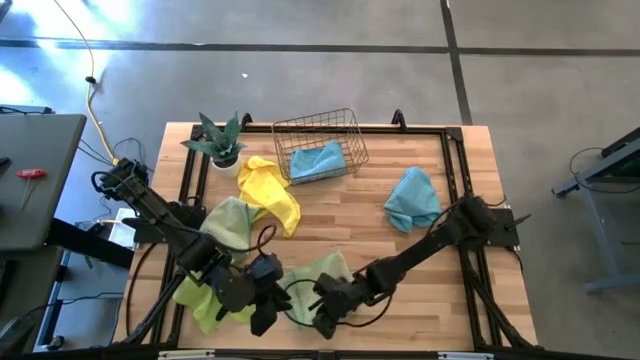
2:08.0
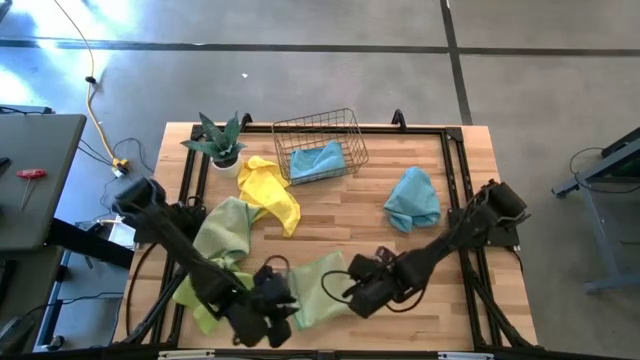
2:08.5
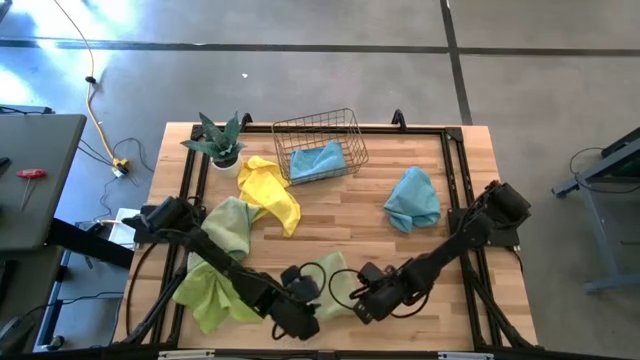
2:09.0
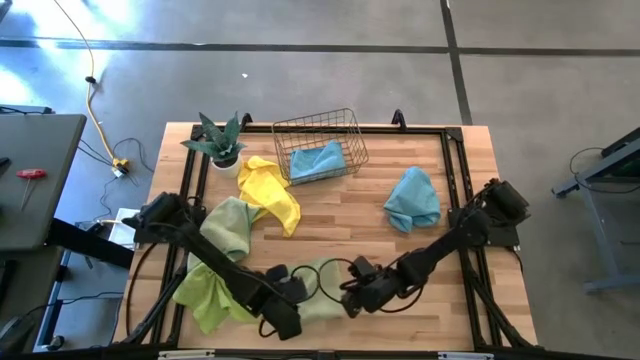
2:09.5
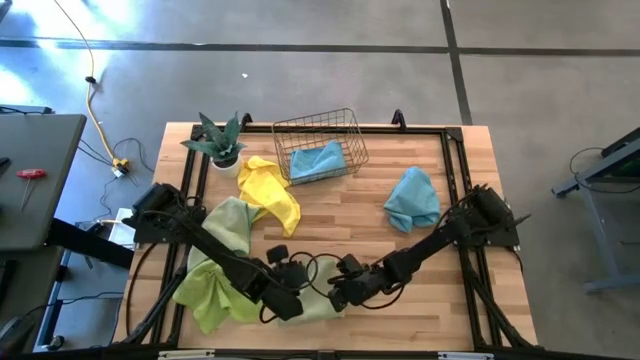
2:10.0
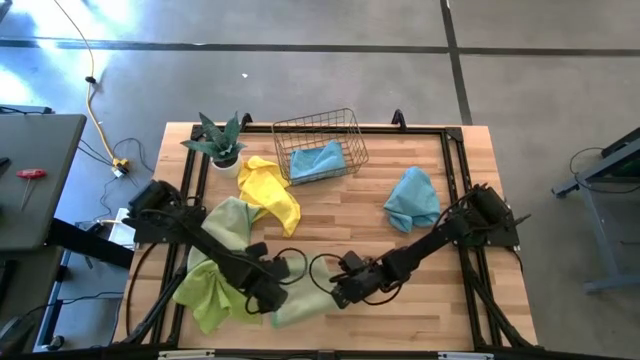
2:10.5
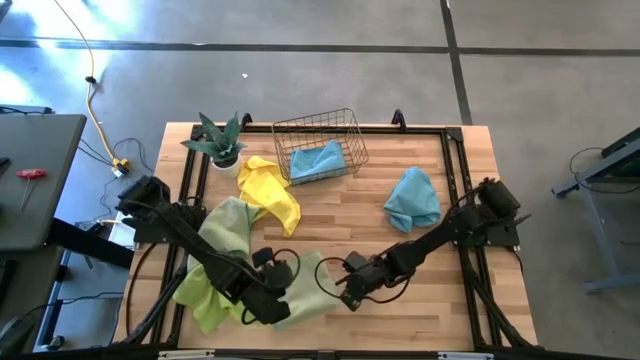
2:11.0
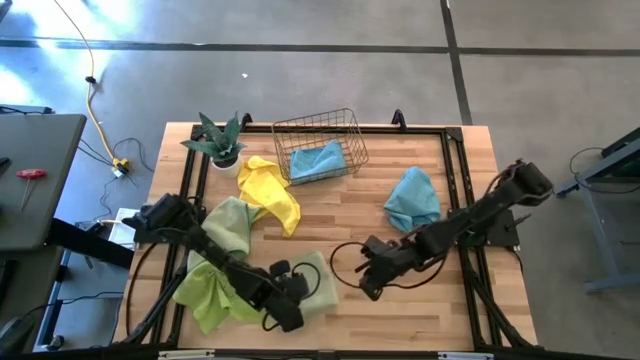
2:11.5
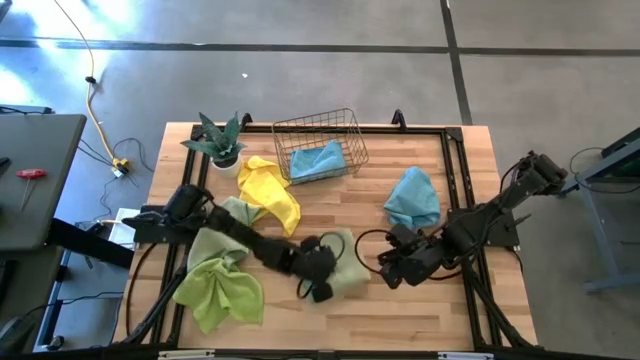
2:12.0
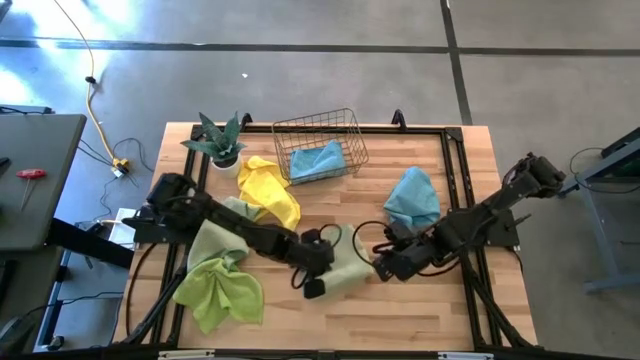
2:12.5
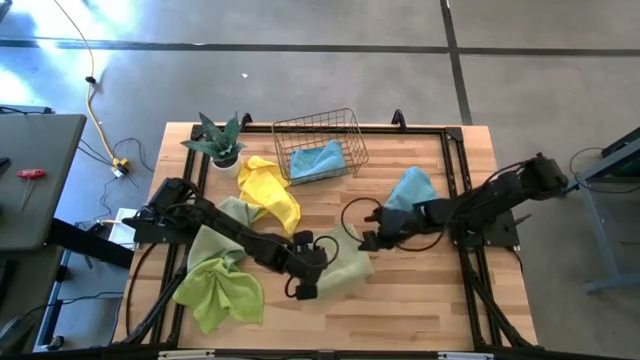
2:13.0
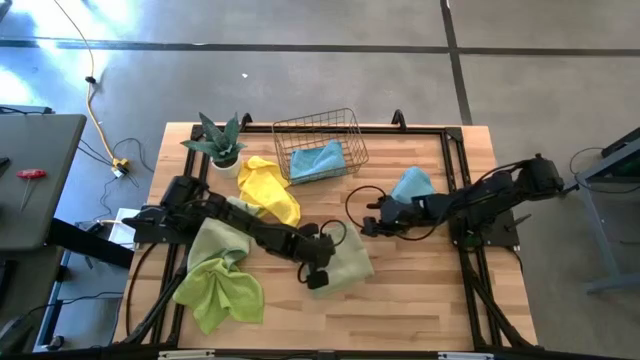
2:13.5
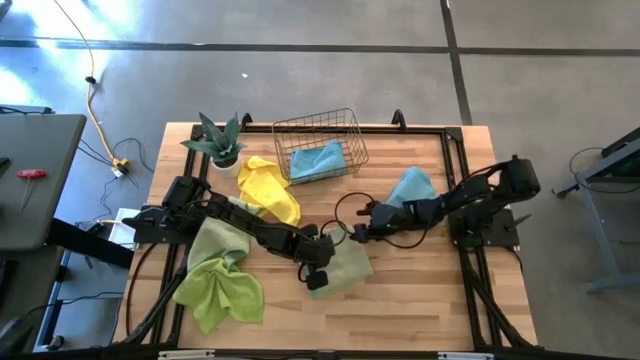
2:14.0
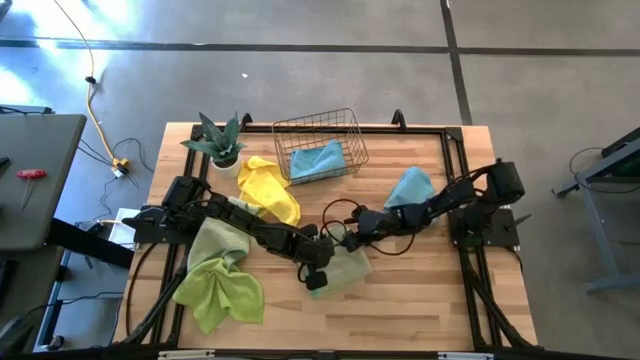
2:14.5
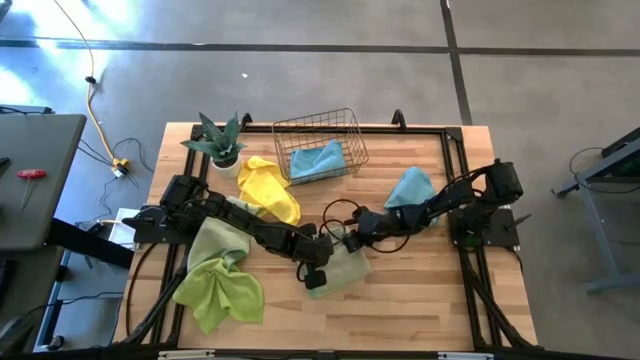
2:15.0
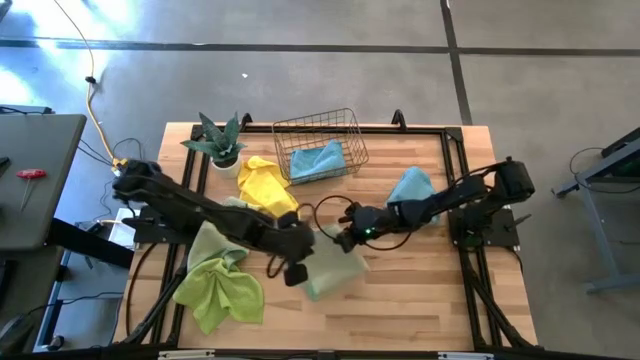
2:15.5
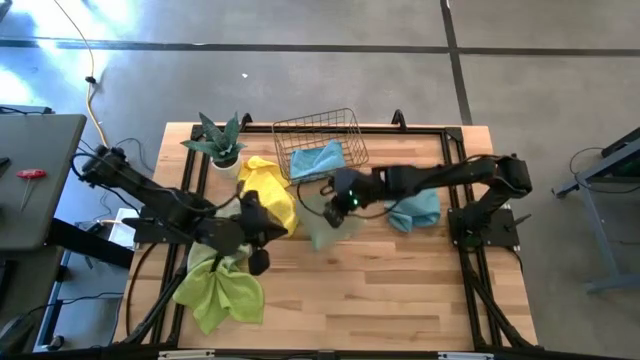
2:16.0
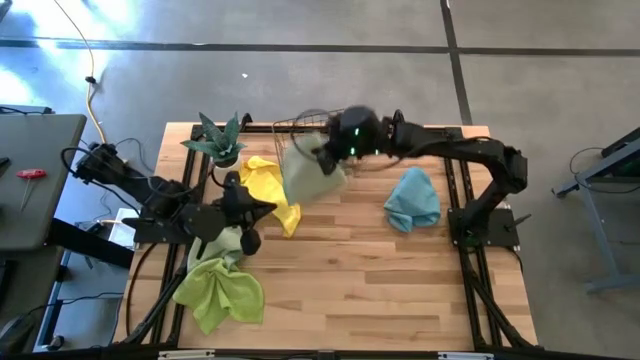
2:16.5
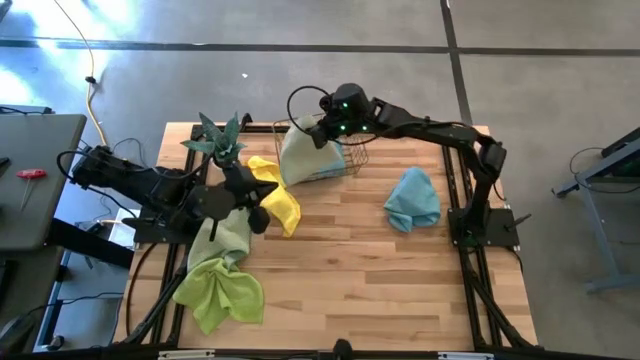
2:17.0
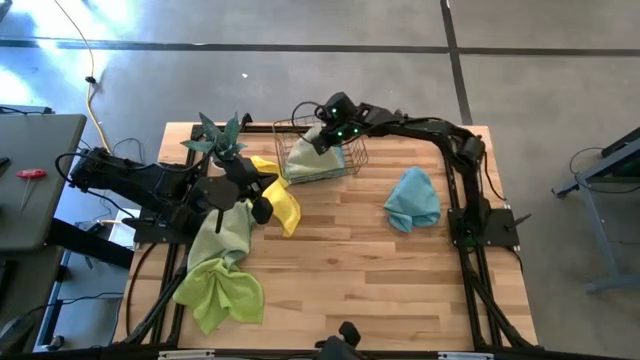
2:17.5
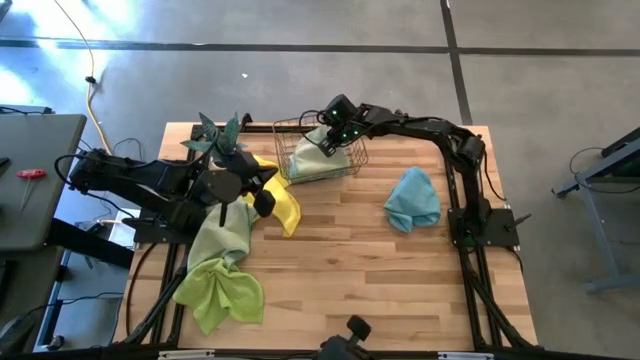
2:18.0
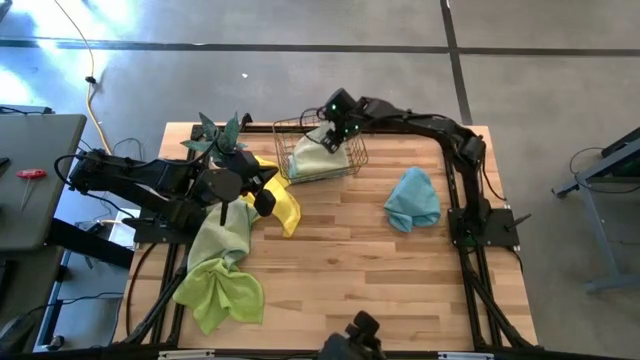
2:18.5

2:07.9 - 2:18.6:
Task: Fold microfiber towels
Put the right light blue microfiber cloth in the basket

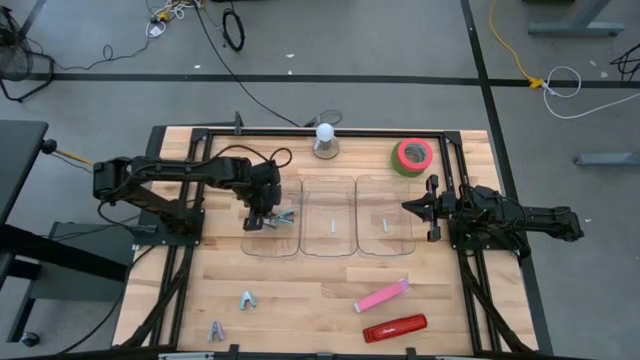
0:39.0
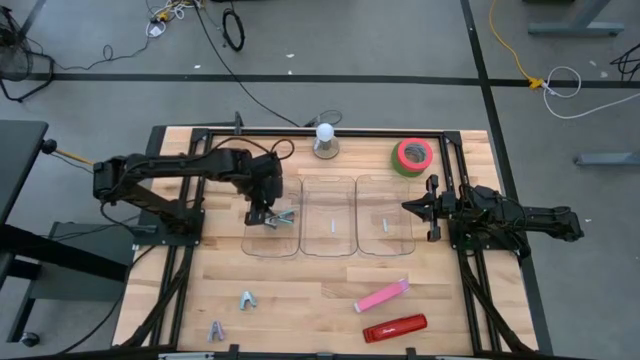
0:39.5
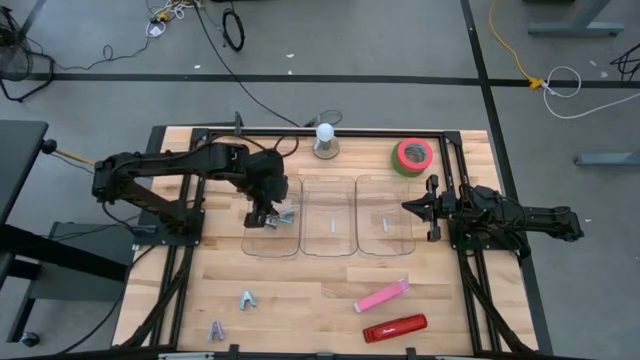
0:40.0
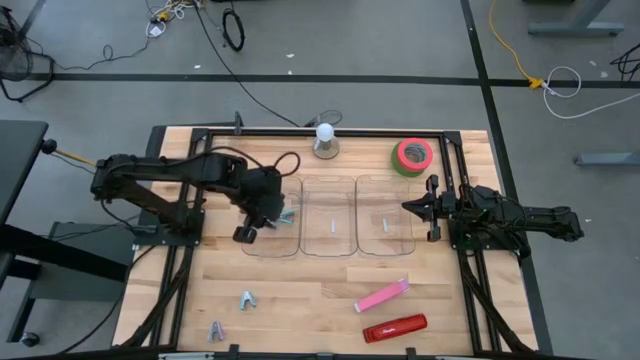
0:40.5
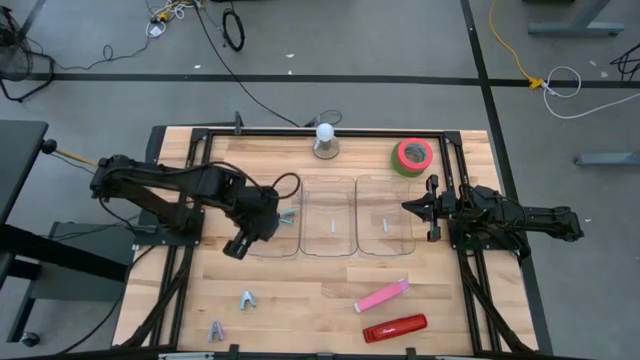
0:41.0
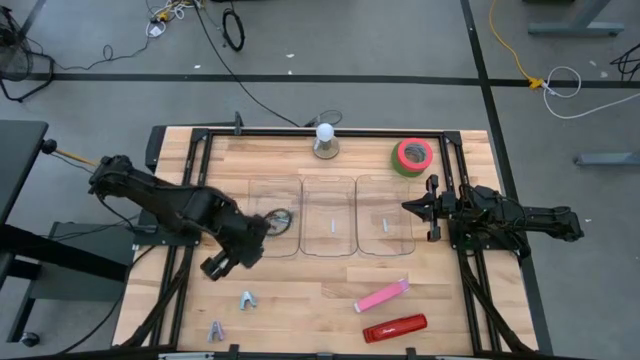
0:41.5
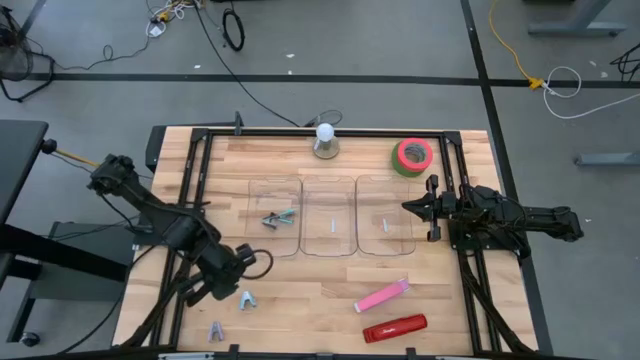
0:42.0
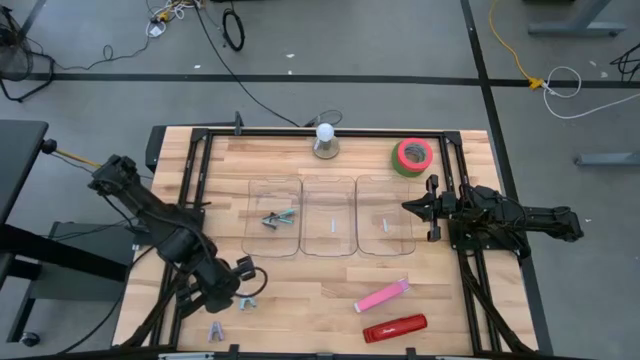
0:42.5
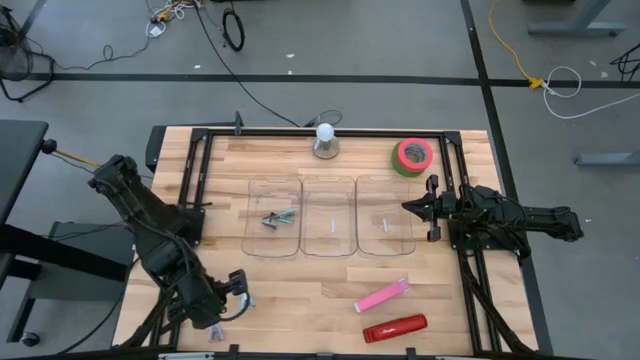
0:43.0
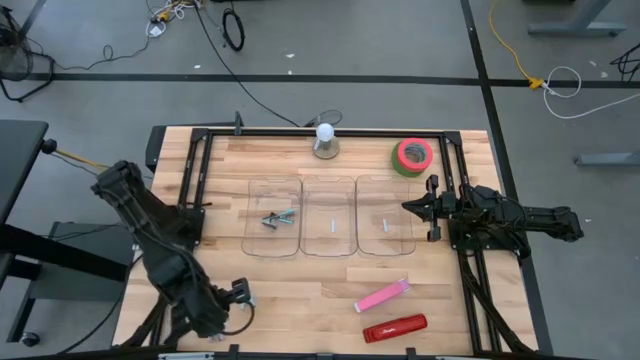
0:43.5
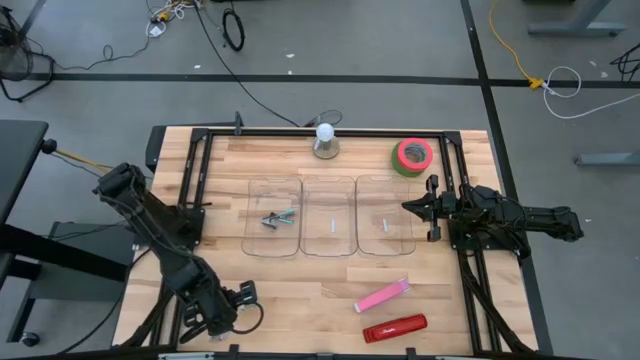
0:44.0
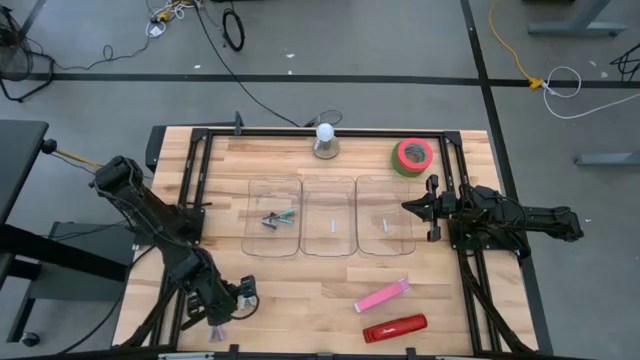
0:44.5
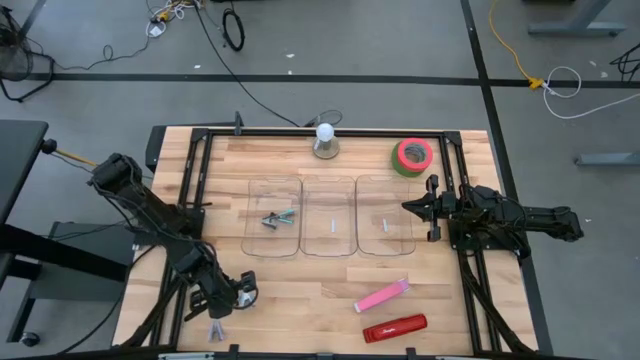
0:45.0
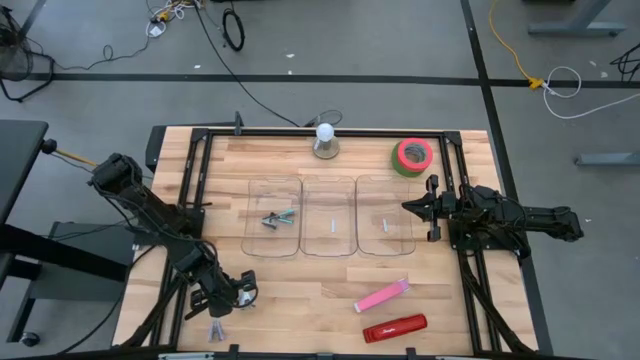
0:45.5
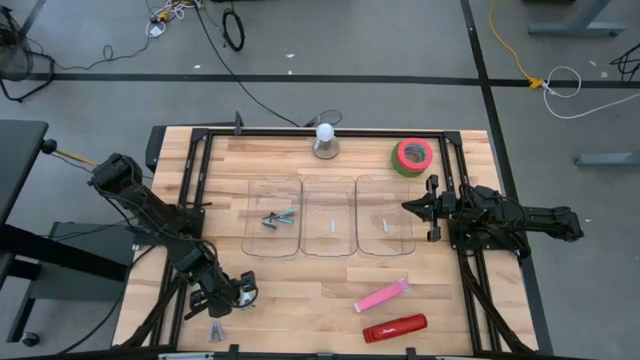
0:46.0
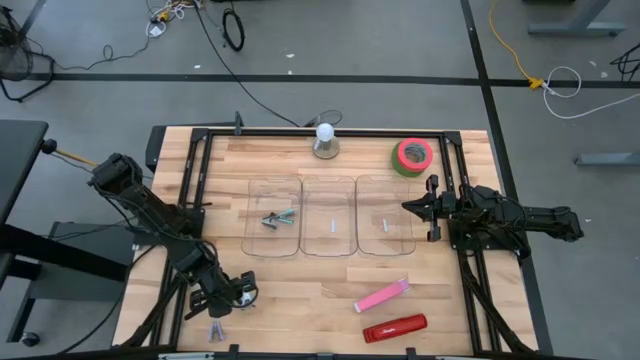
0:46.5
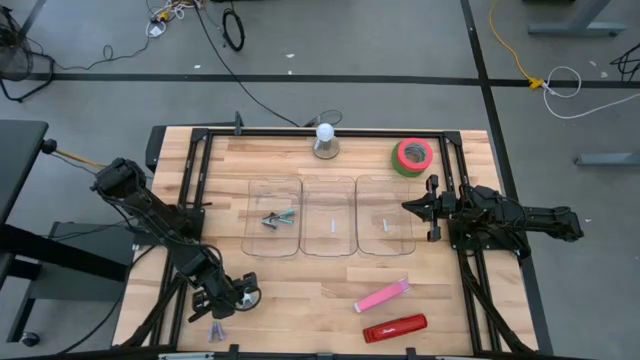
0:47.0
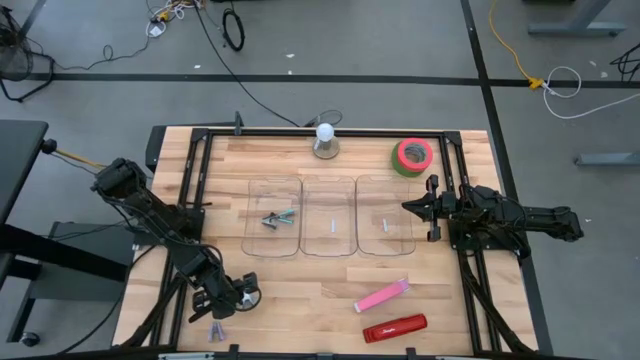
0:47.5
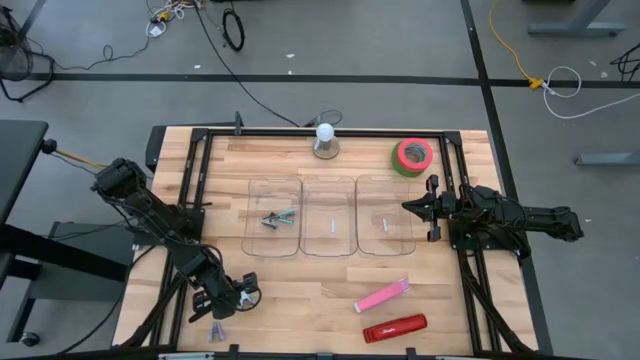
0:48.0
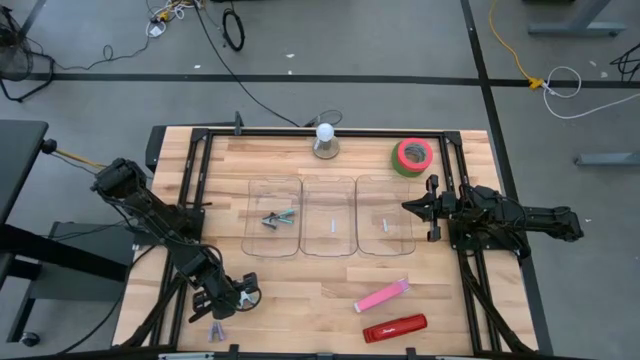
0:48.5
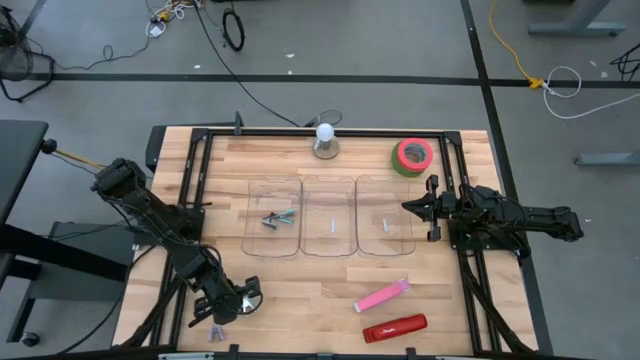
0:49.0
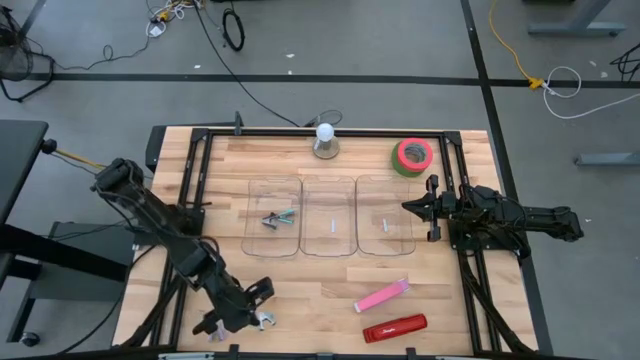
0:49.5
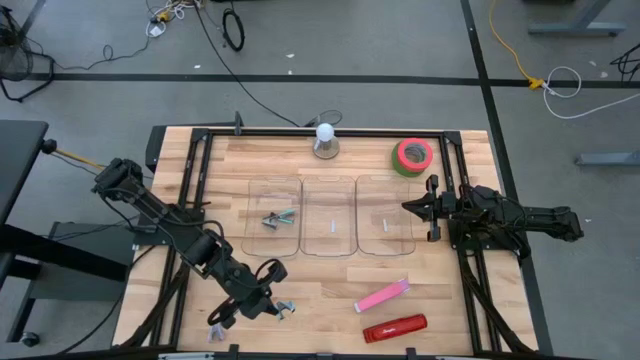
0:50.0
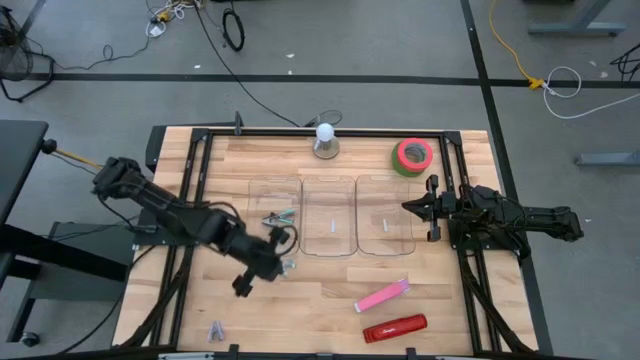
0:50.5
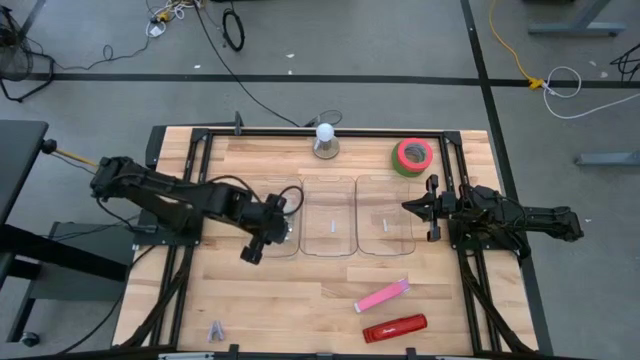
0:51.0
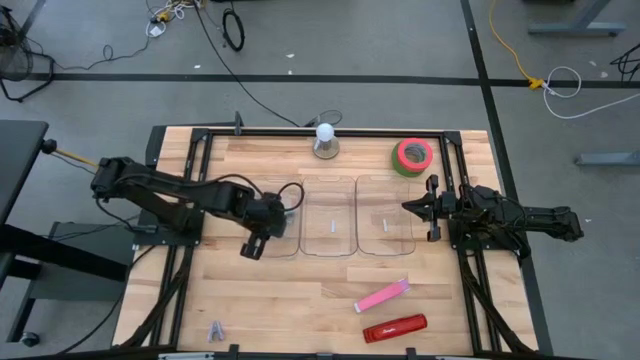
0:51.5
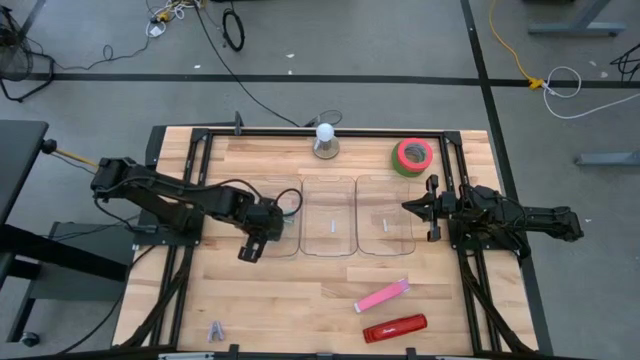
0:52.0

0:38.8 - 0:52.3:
Task: Pick and place Stapler, Stapler remover, tape
Put the blue staple remover into the left transparent bin
